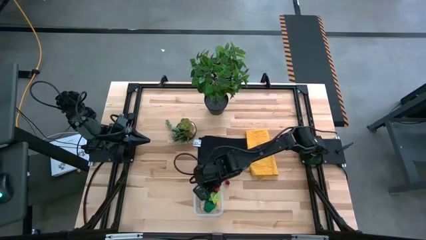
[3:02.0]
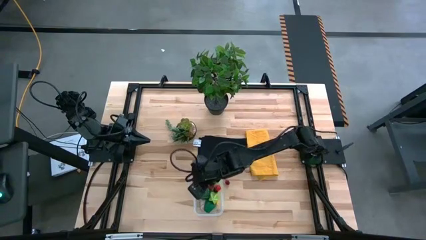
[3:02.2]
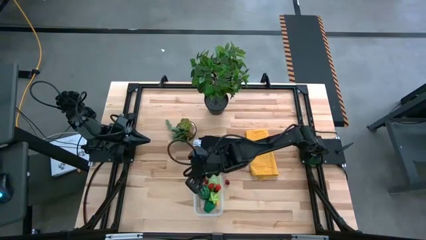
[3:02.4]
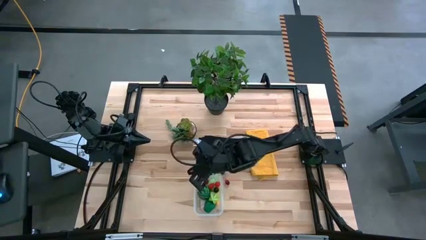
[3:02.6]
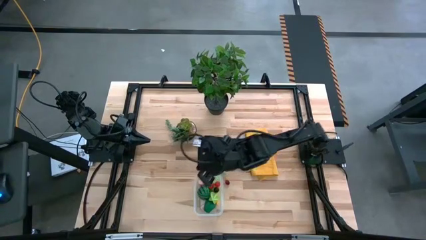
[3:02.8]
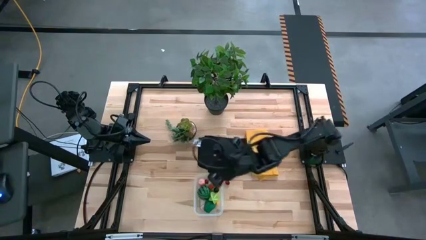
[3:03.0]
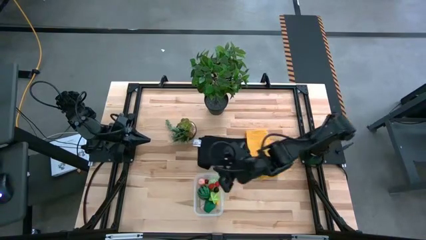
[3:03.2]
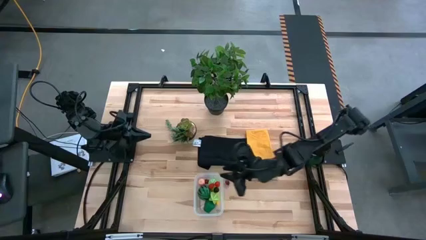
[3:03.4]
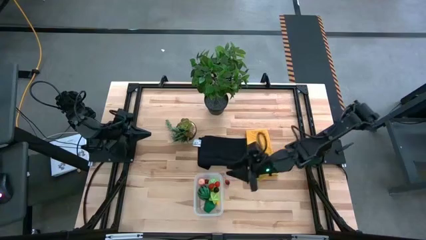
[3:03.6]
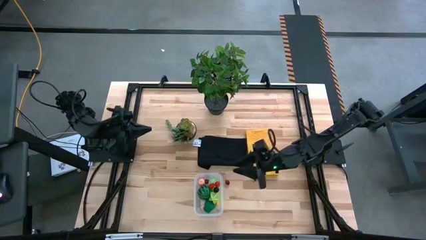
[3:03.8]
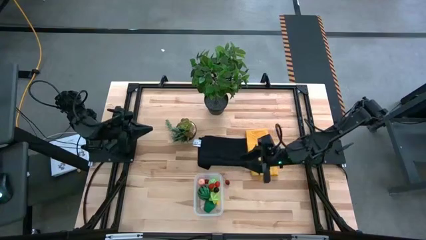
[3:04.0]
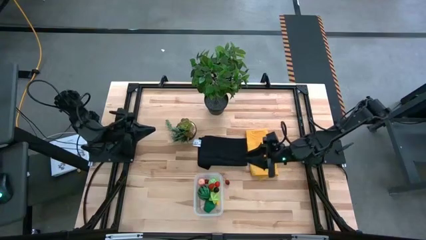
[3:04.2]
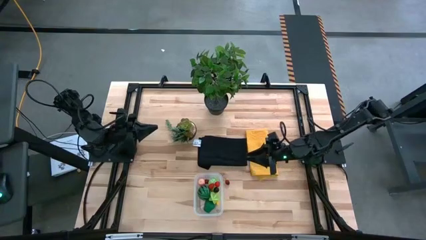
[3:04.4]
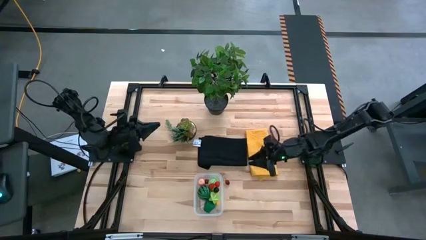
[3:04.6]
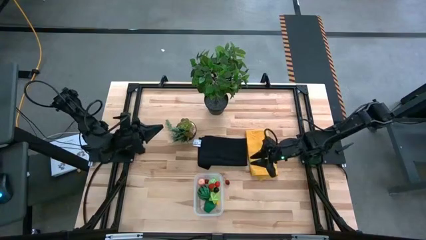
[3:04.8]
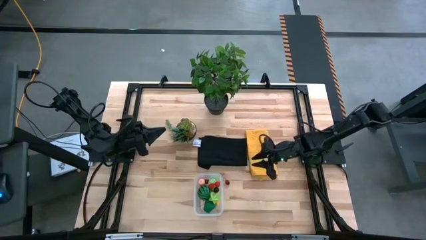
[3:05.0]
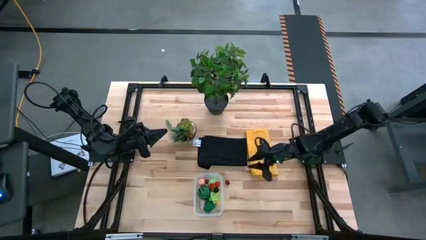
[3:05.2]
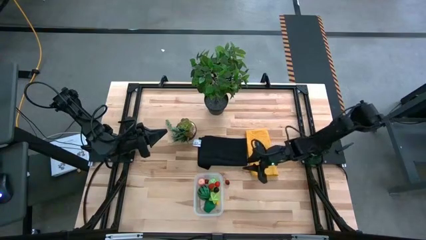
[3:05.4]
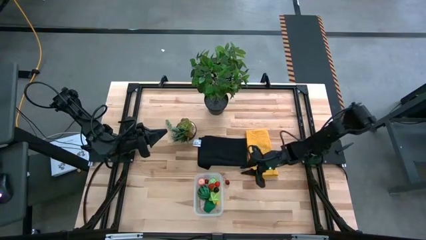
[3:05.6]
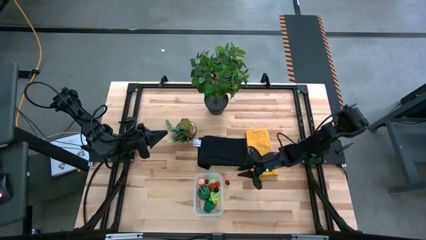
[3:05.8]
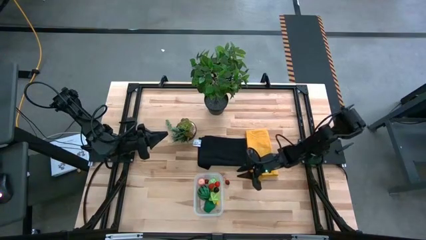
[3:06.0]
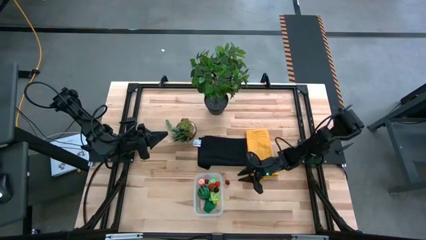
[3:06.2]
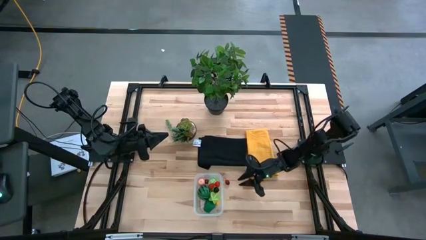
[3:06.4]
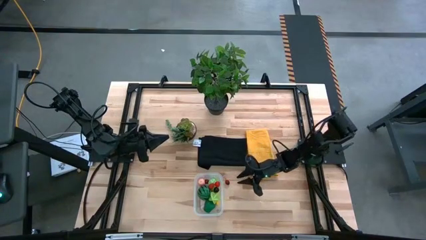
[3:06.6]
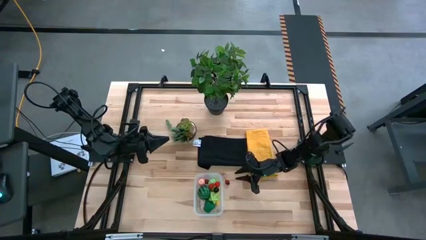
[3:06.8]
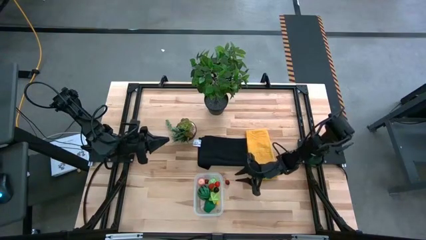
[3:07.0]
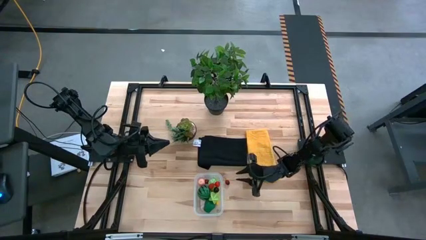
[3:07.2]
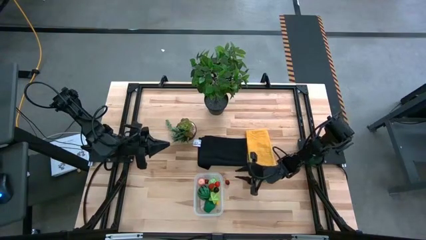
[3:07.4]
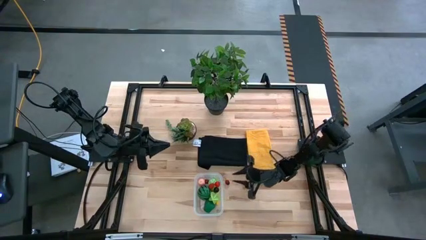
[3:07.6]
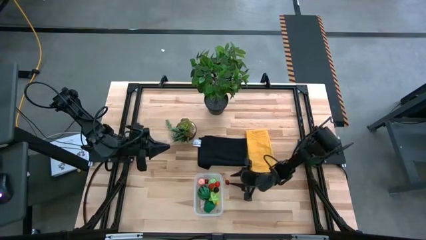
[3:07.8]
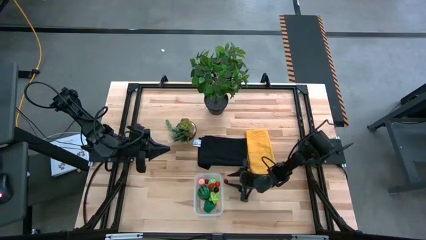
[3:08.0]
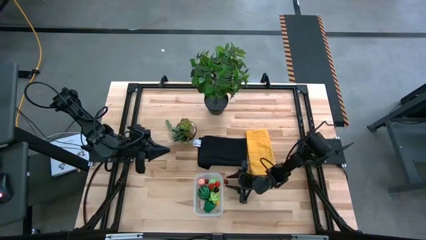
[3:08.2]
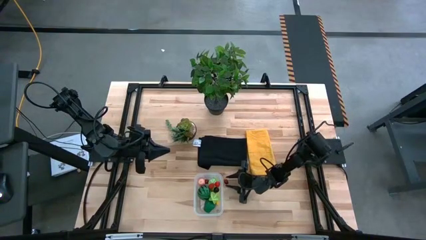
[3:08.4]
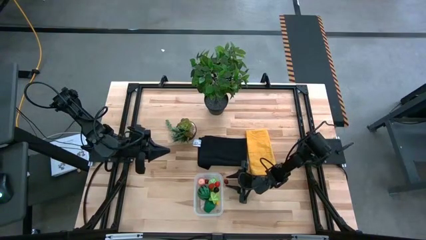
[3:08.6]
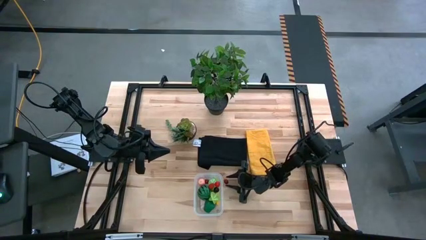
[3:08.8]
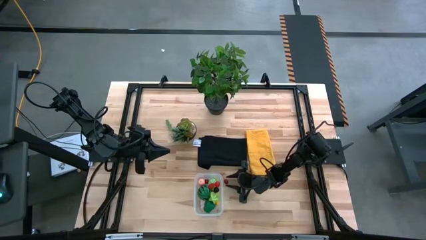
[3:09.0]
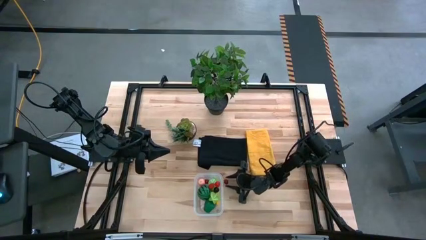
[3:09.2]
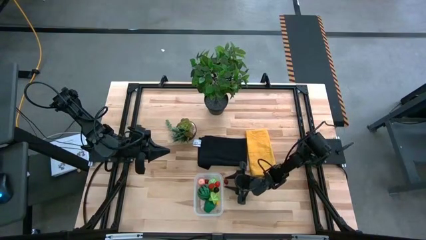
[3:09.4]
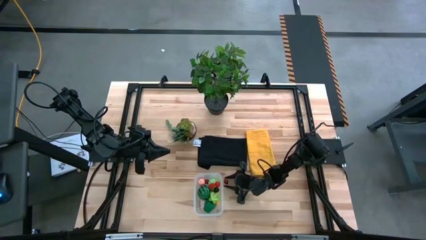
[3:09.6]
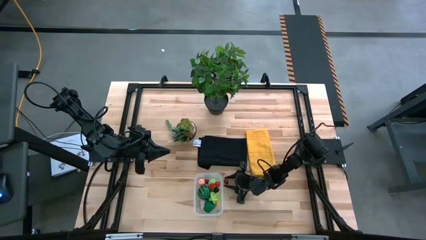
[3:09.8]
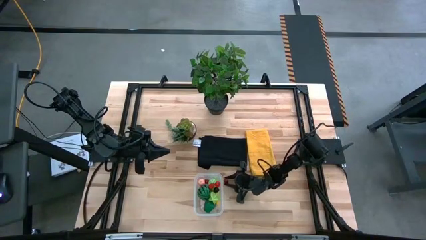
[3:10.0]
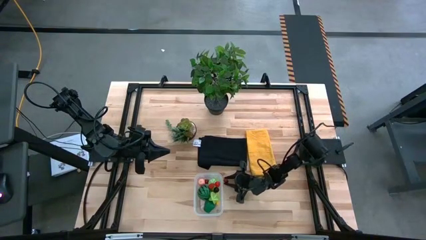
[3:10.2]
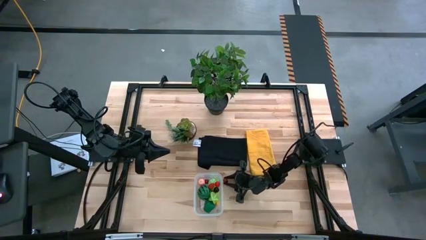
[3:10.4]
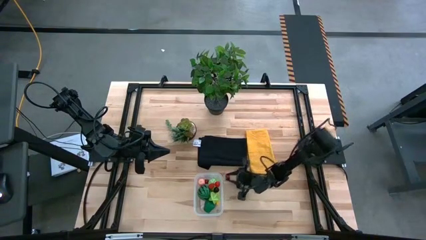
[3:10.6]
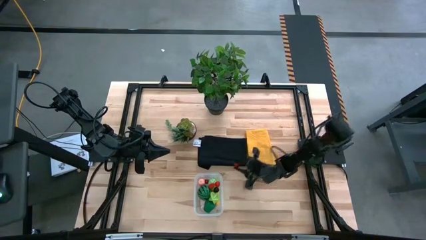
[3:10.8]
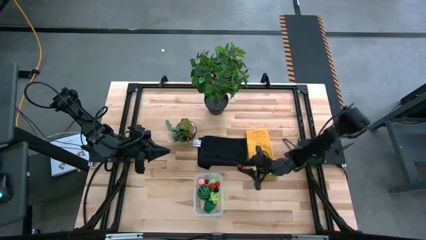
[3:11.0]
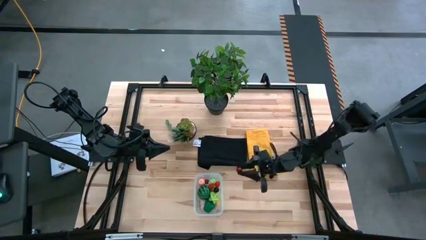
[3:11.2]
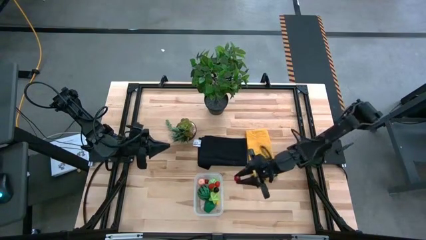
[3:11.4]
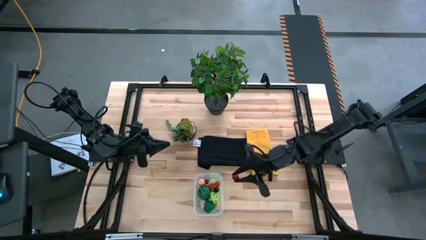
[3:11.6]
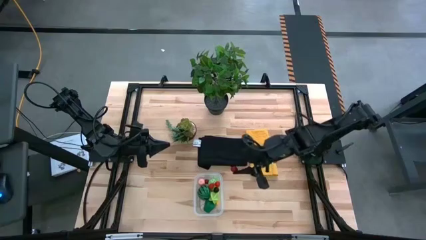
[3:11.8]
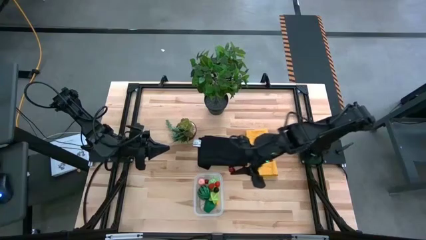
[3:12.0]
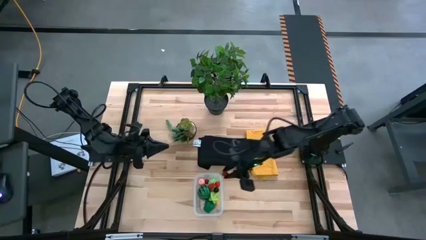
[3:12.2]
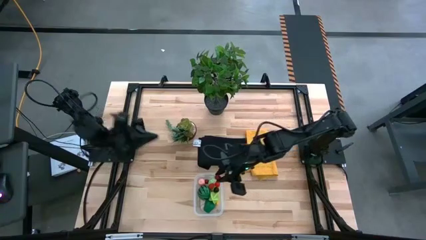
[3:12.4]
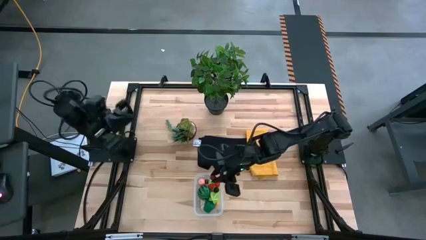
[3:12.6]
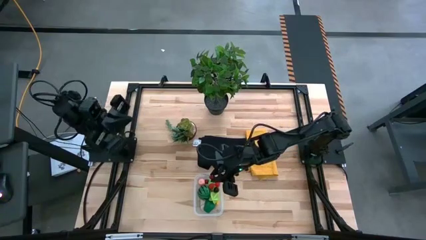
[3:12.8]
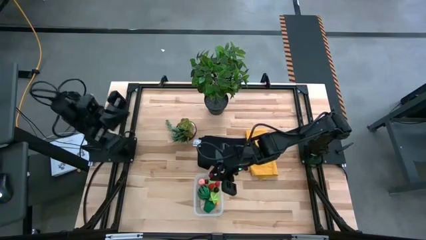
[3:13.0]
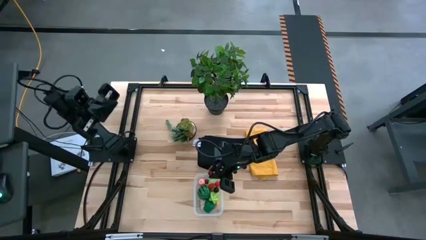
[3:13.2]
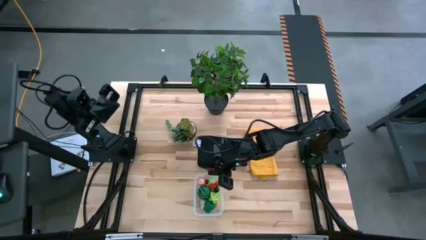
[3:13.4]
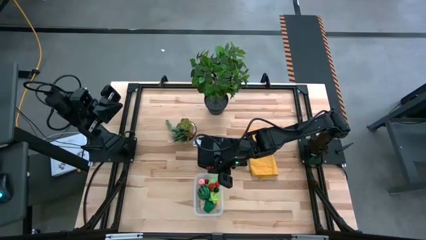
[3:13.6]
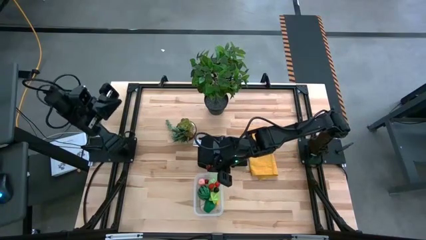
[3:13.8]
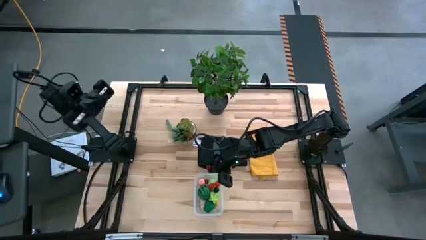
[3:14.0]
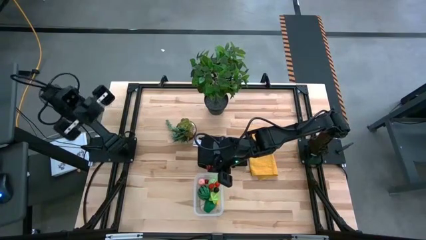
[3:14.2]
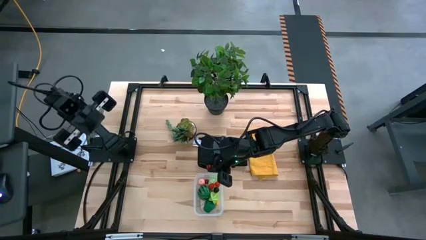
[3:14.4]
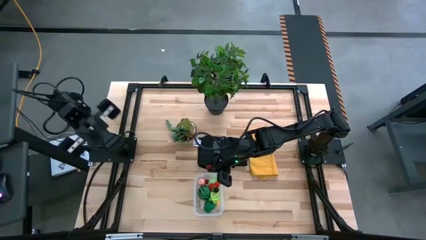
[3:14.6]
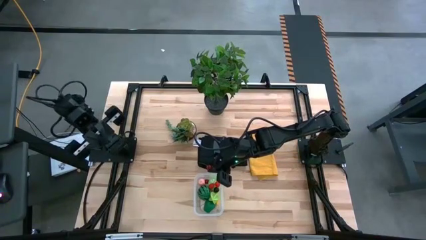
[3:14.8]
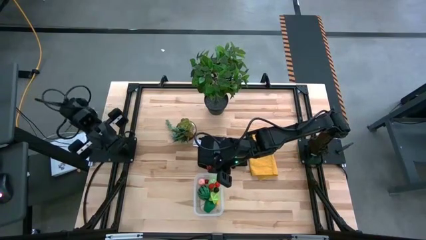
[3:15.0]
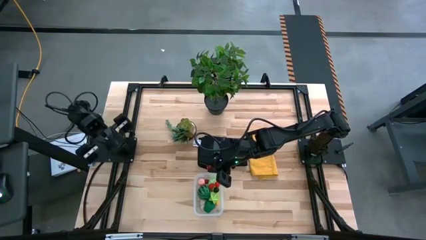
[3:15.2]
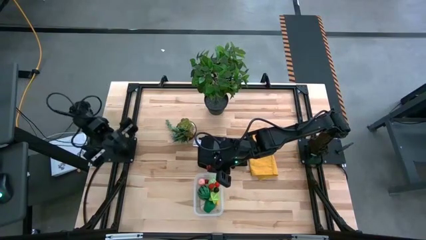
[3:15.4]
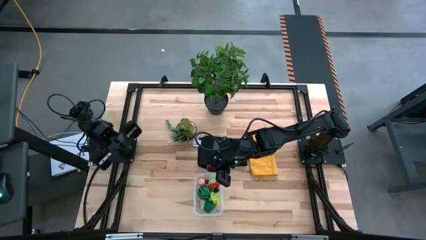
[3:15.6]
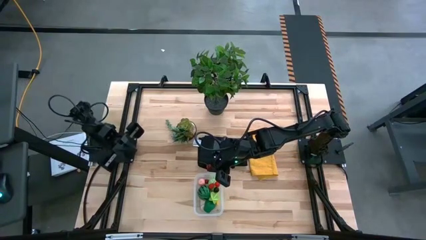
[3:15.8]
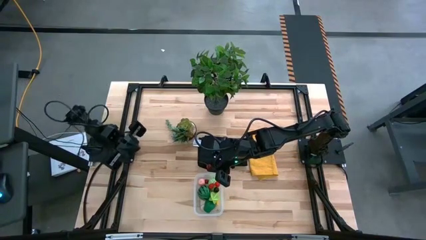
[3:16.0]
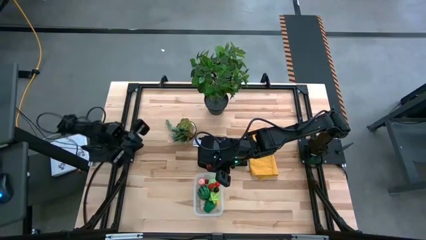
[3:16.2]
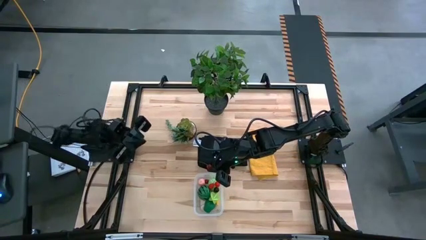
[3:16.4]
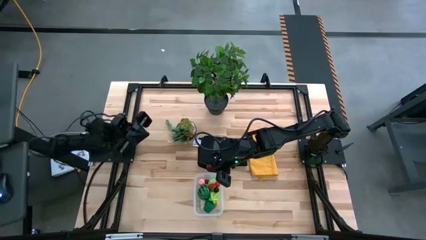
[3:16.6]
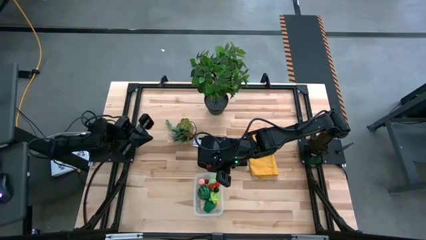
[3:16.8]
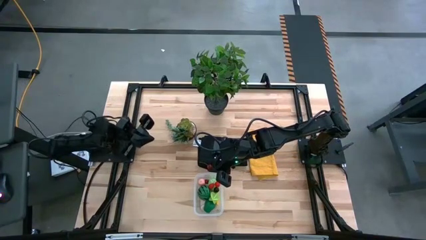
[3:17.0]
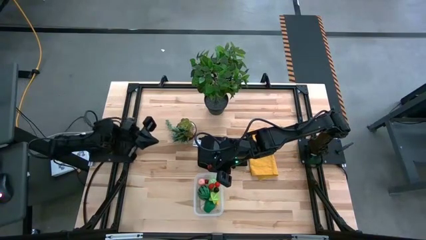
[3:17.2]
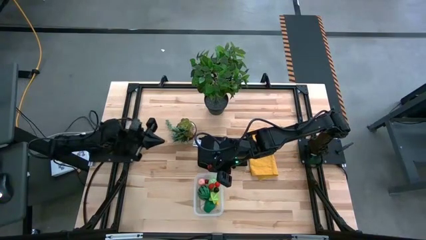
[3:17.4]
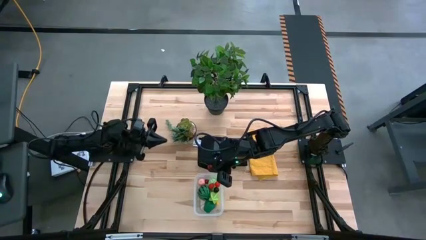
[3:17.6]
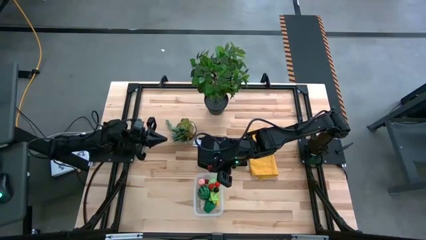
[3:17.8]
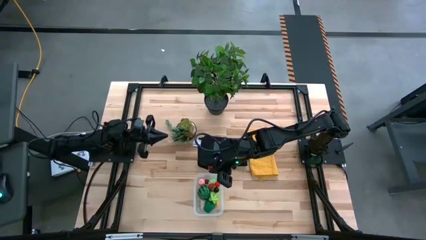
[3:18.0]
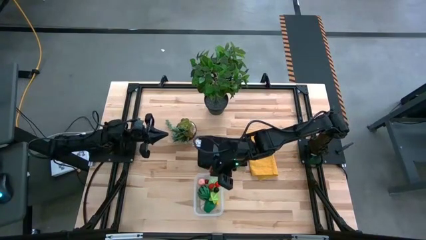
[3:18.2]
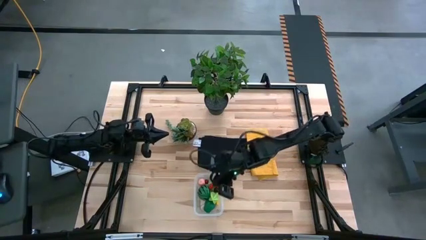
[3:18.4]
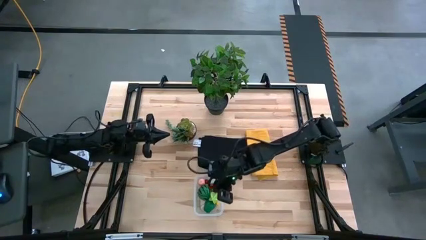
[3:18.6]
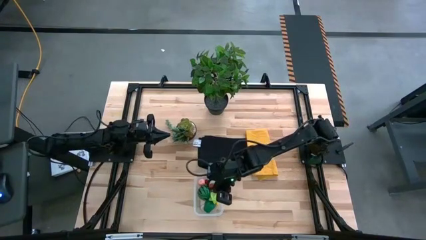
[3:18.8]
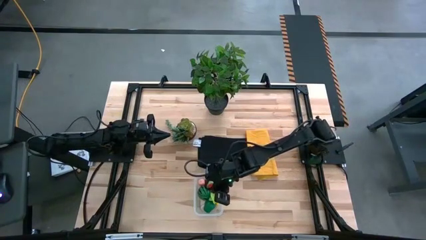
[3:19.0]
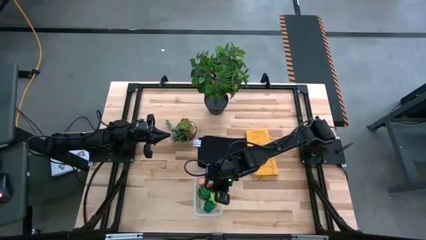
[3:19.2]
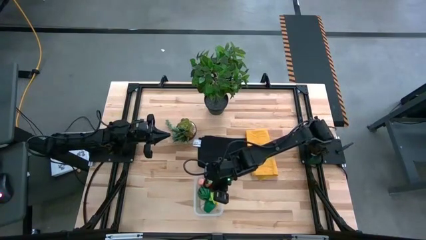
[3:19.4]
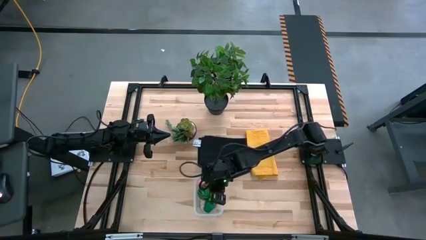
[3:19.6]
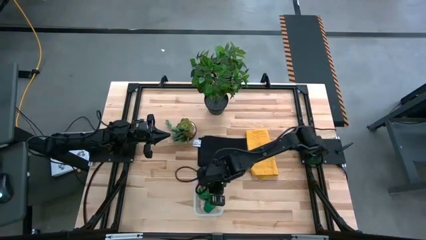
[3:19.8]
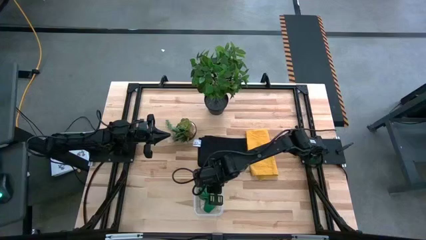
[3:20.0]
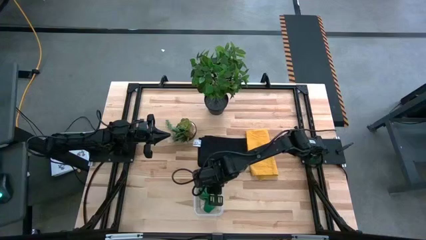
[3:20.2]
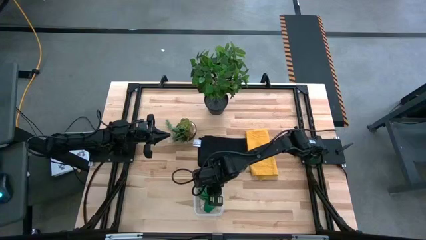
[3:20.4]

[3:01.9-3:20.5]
Task: Pick and placing Produce into tupperware
Put the red cherry into the bin
